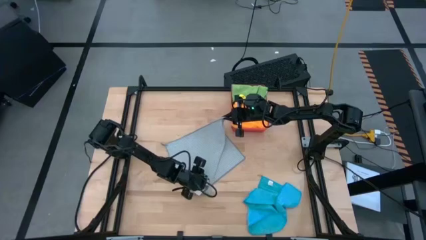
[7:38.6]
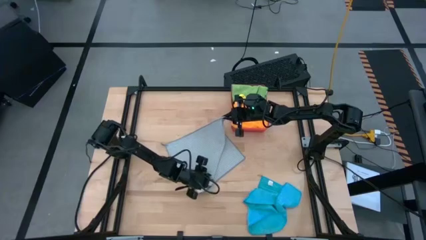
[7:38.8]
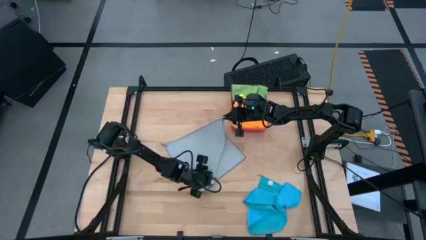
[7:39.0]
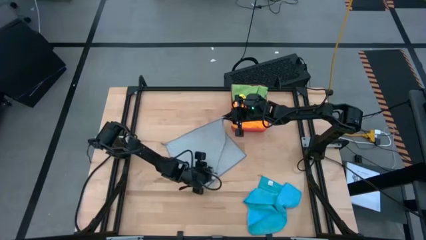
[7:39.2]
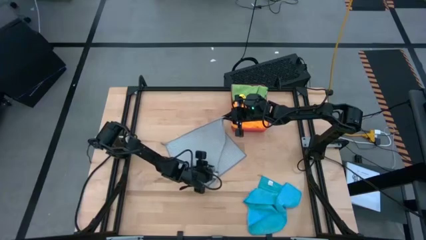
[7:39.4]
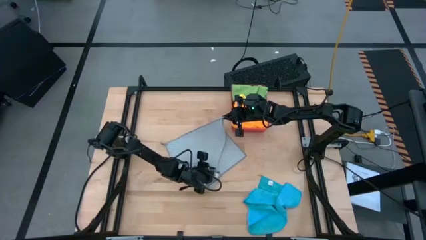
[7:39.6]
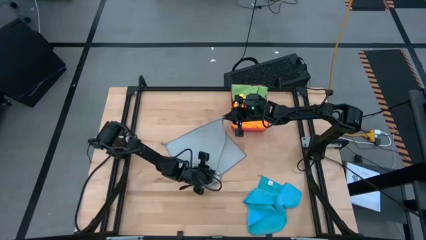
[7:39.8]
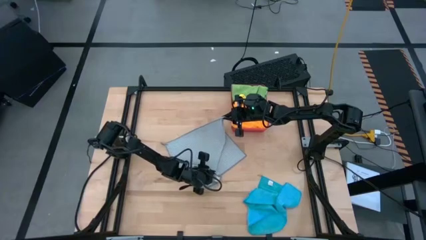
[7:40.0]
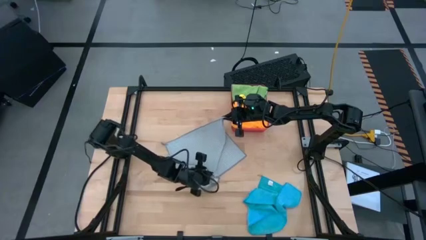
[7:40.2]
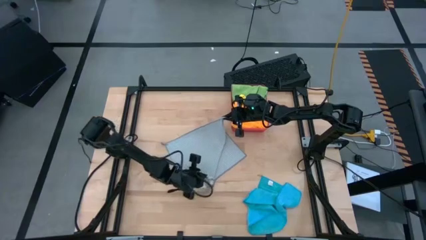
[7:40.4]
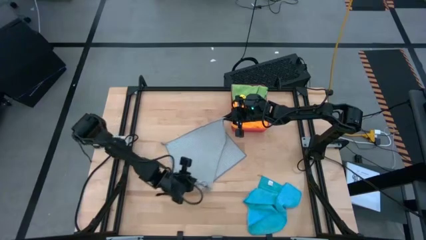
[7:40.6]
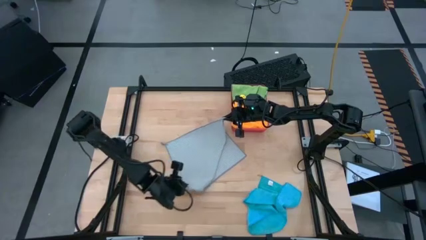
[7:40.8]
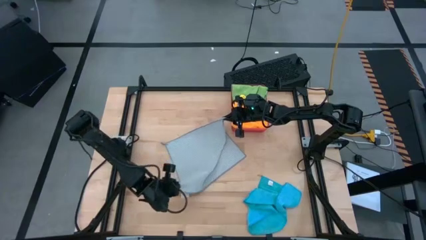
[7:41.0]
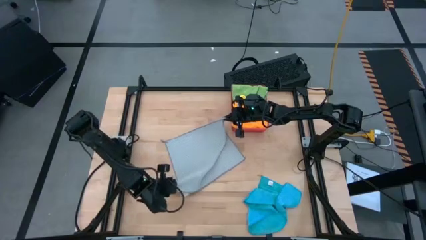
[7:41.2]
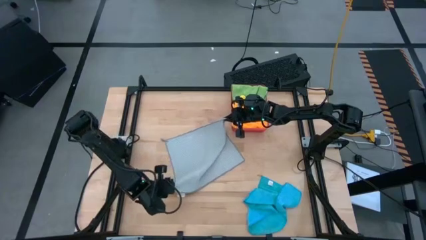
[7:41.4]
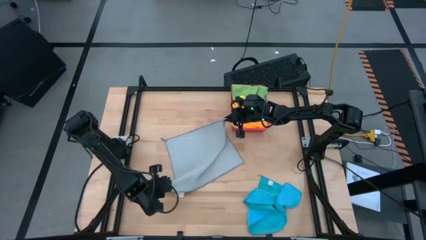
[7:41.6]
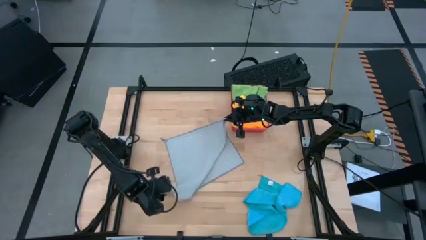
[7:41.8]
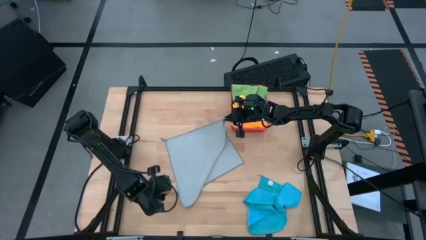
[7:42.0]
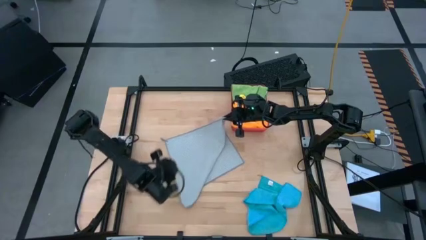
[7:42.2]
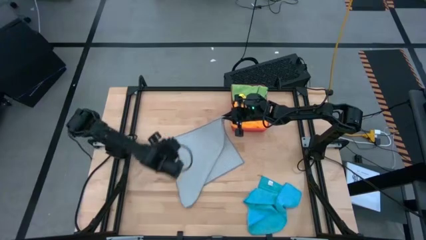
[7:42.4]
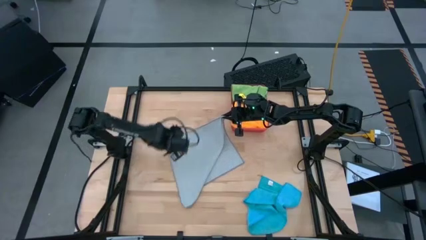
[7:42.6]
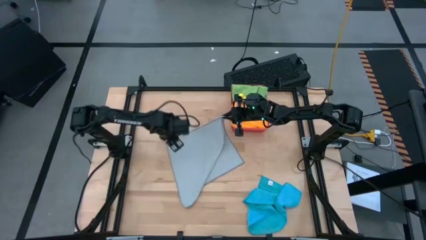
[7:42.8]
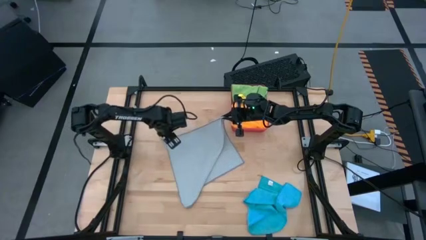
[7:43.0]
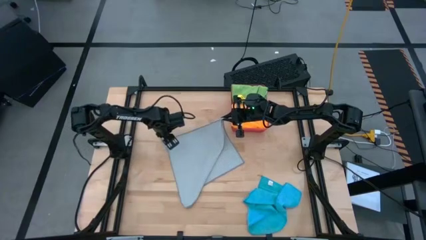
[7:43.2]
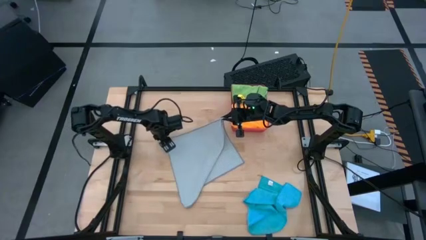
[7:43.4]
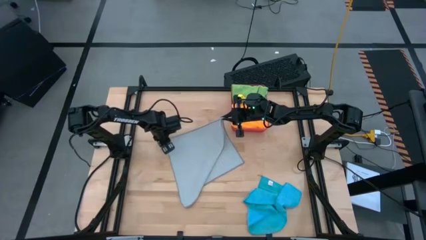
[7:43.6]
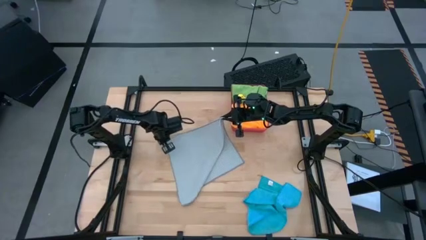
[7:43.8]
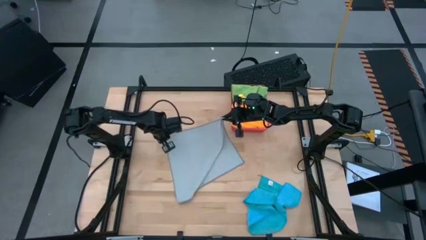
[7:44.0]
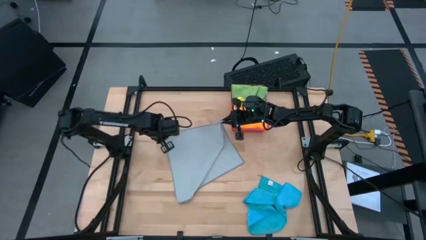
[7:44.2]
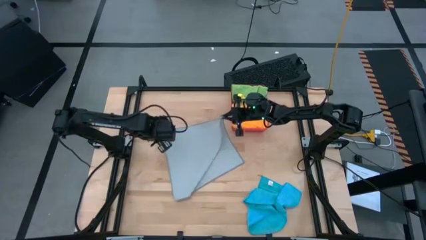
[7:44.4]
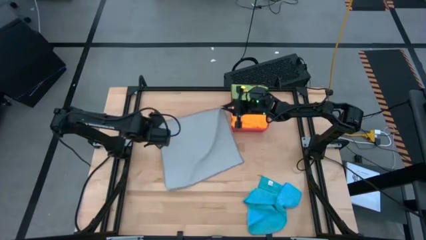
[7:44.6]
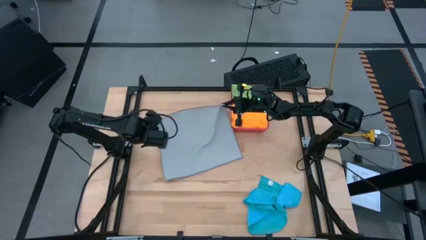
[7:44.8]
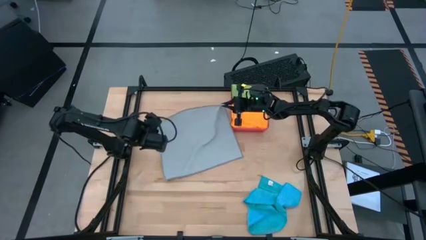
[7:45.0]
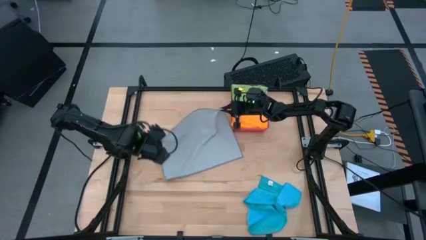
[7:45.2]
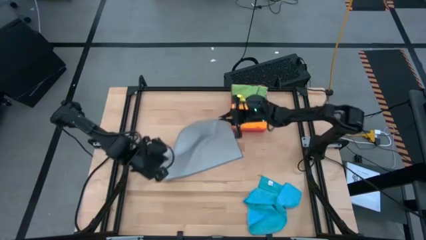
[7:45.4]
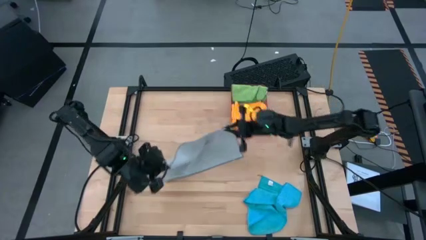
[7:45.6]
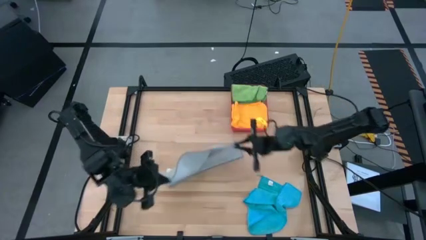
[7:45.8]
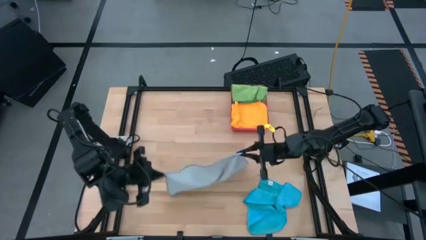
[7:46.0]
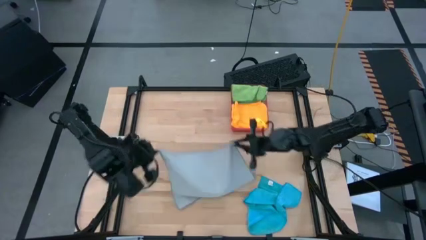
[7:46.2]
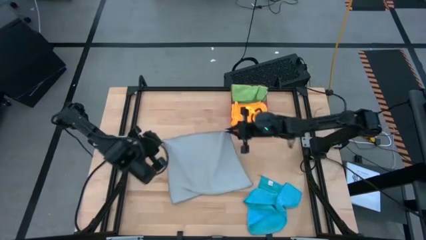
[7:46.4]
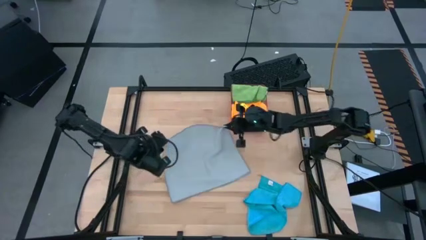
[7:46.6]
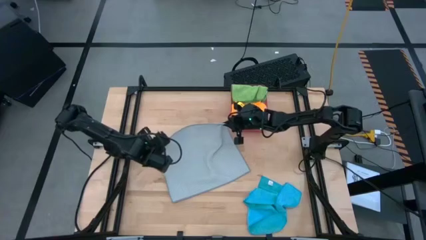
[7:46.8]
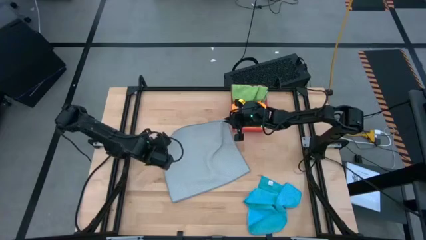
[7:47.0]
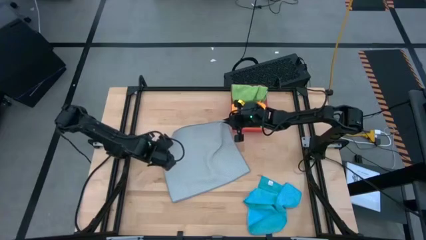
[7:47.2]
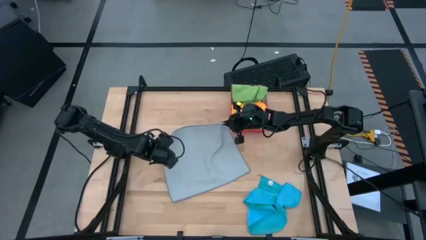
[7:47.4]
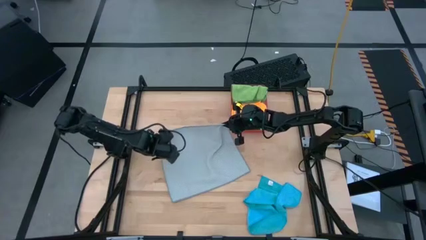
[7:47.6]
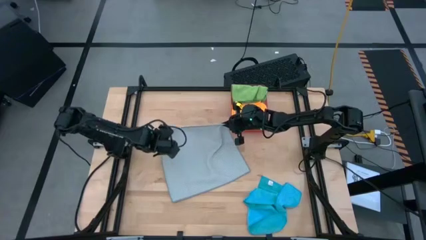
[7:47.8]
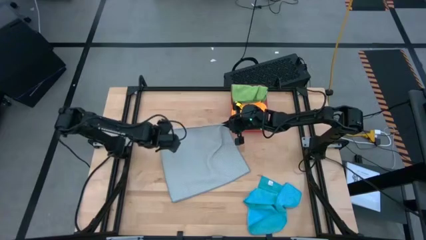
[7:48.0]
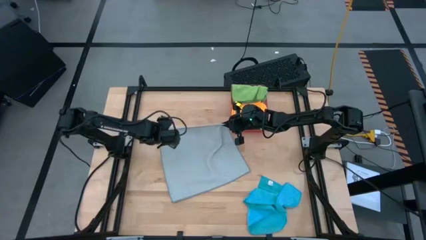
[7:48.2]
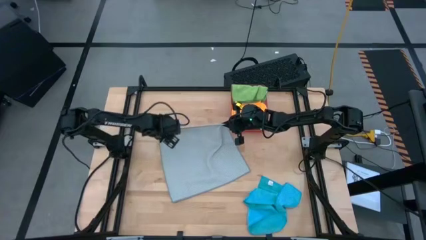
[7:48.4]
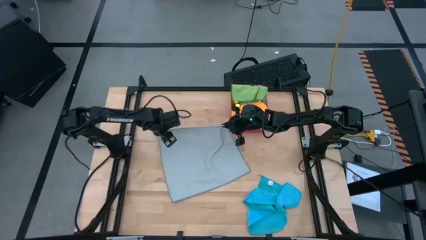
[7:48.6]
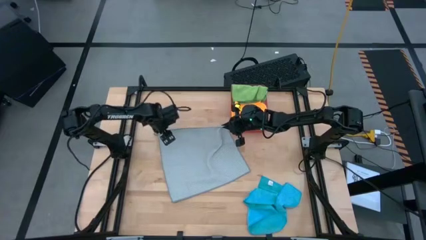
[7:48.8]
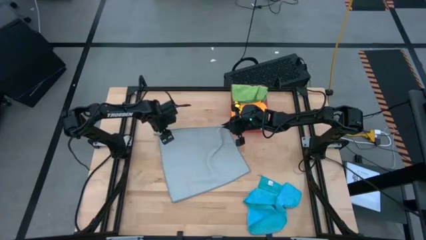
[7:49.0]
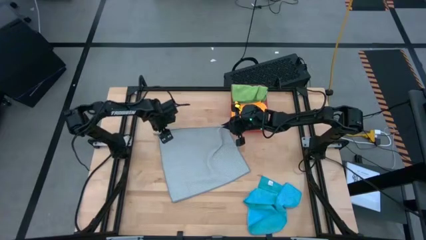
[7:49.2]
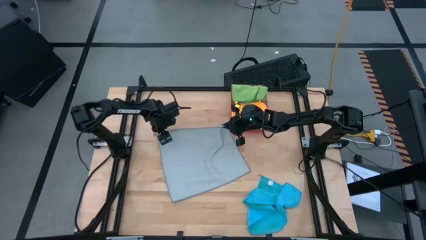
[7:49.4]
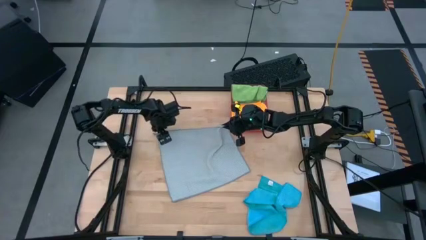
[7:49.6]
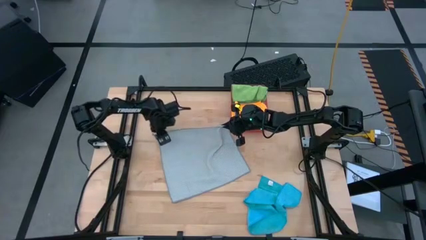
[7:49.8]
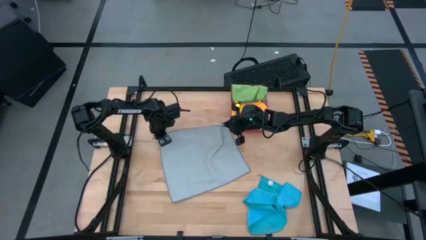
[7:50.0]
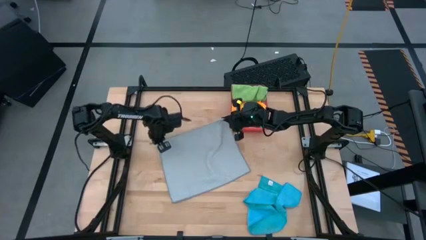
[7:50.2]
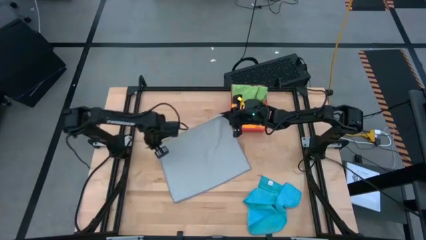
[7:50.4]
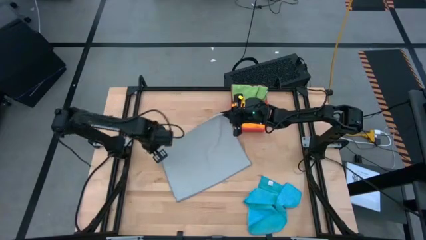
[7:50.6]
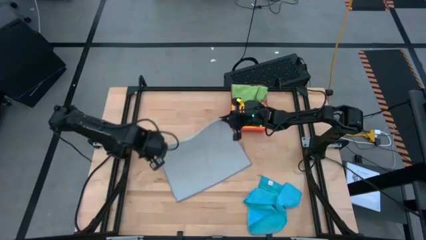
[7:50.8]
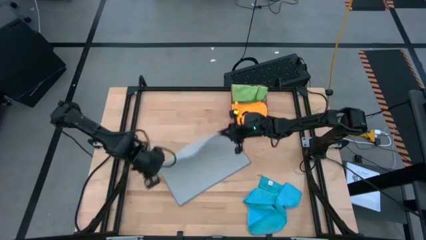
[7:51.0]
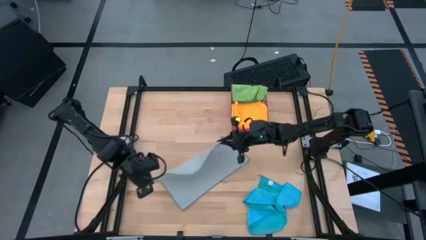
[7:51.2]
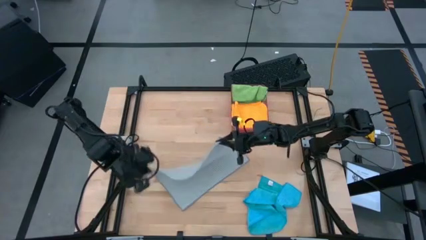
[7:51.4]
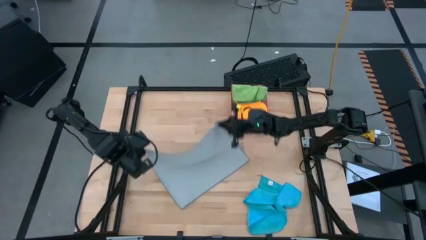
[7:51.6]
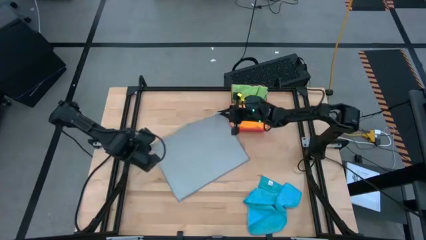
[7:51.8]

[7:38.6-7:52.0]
Task: Fold microfiber towels
Fold the gray microfiber cloth

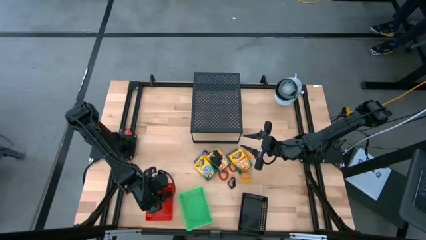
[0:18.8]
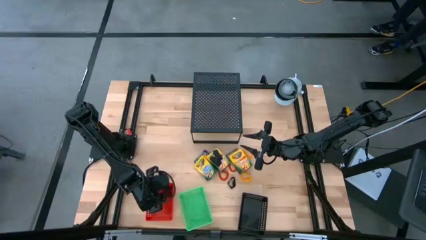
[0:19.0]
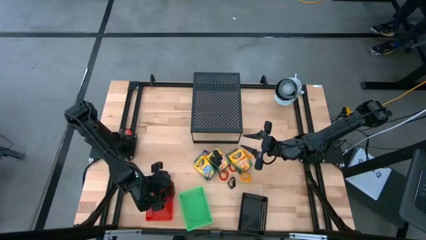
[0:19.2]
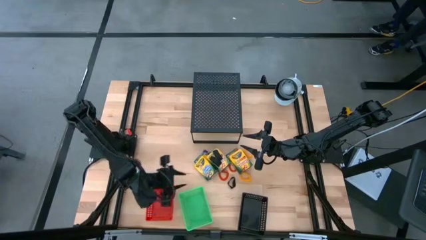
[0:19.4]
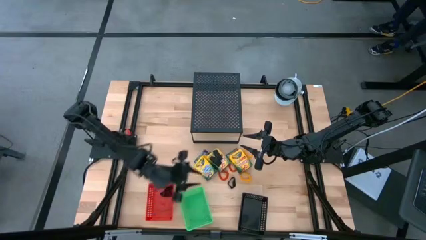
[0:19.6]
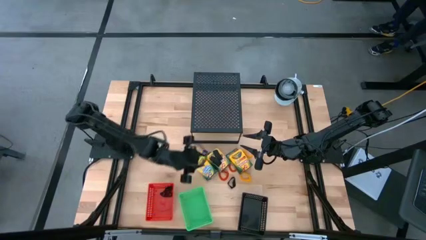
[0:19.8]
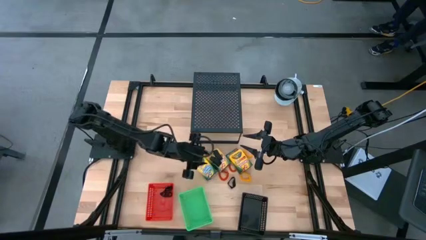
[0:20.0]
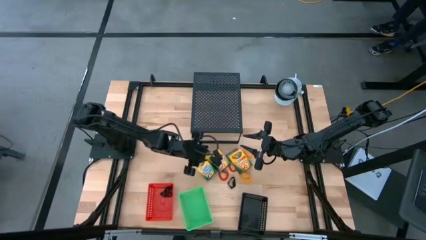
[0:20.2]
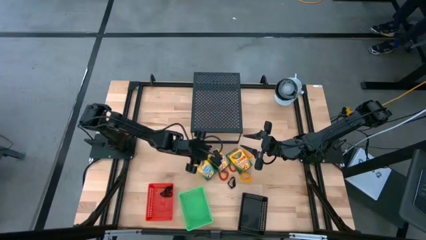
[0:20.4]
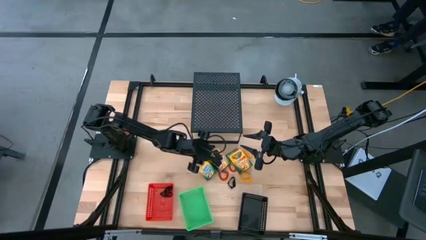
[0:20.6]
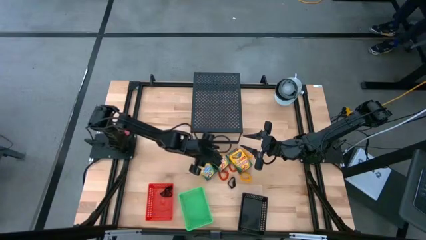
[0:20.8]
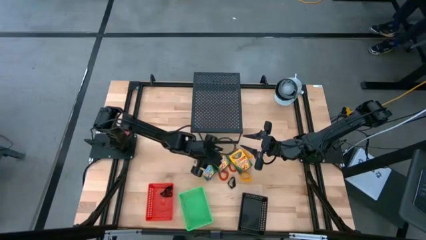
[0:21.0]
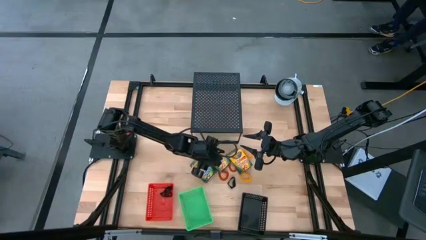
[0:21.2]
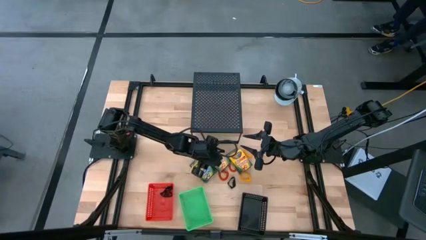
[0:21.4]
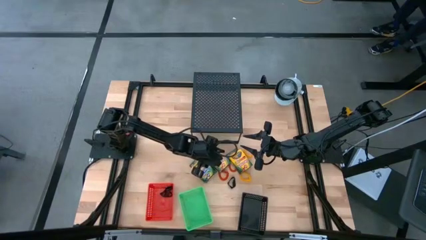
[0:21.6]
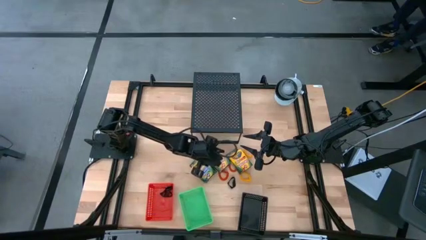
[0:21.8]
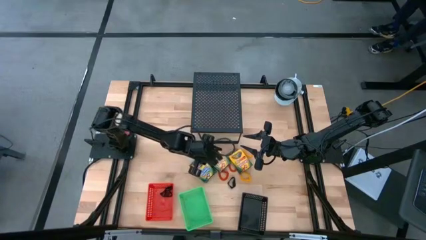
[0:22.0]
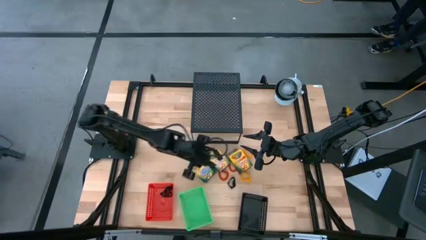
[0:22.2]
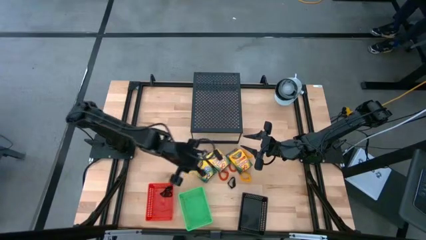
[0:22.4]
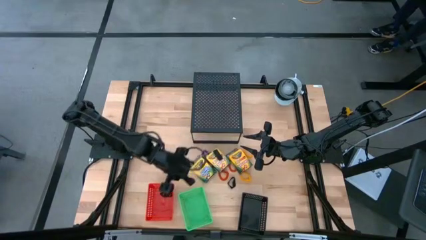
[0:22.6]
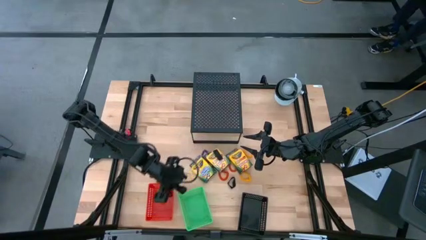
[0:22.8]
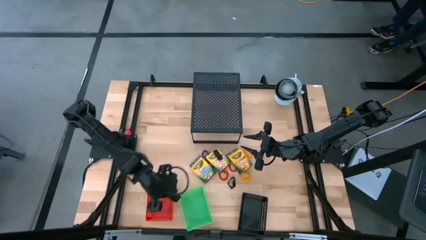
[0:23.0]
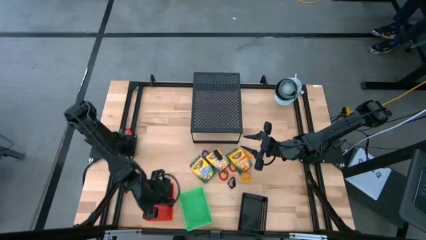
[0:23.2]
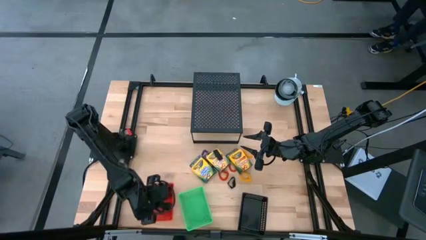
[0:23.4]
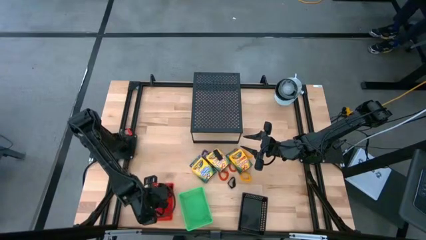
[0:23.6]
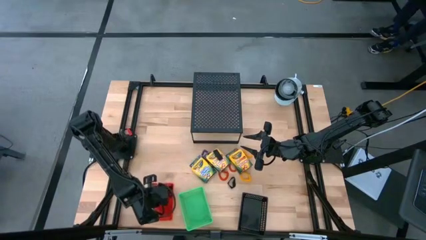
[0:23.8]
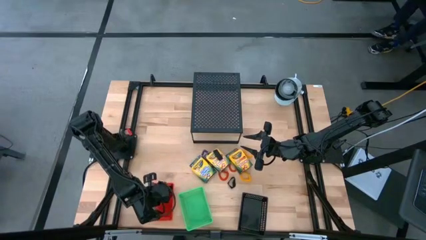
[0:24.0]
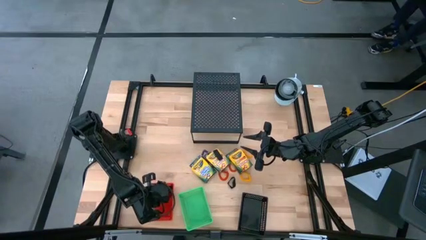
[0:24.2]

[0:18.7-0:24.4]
Task: Pick & Place Office Desk Supplies
Put the black rubberband into the red bin
